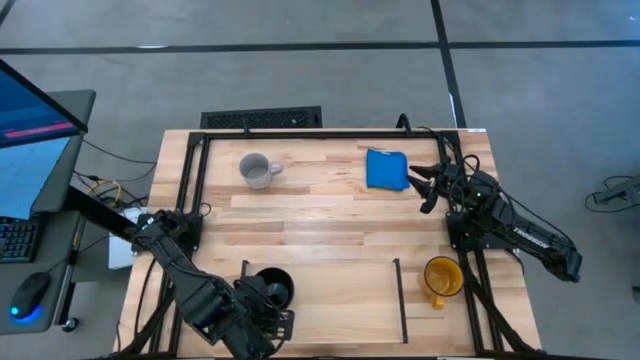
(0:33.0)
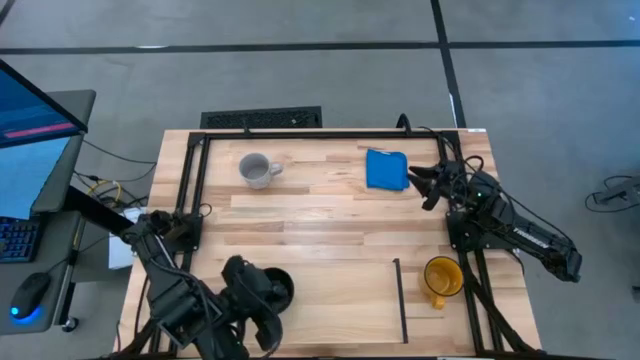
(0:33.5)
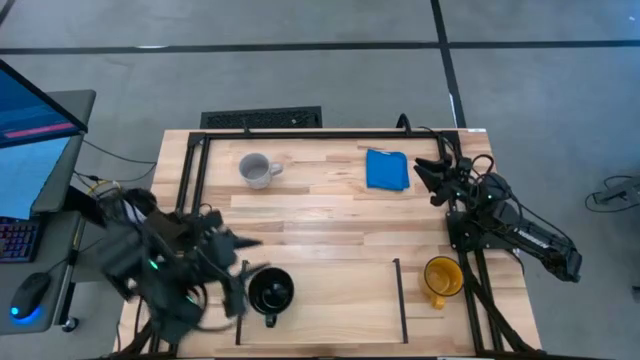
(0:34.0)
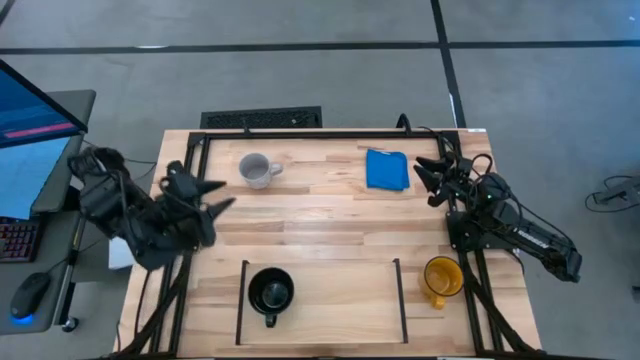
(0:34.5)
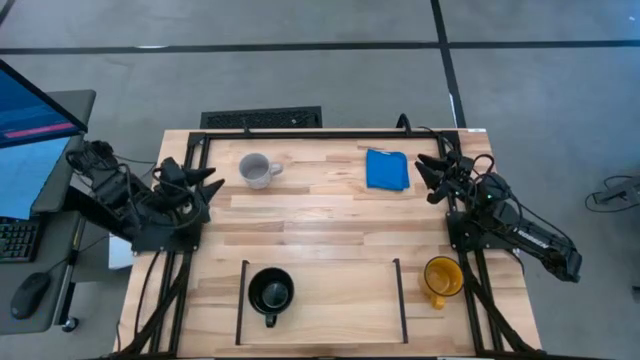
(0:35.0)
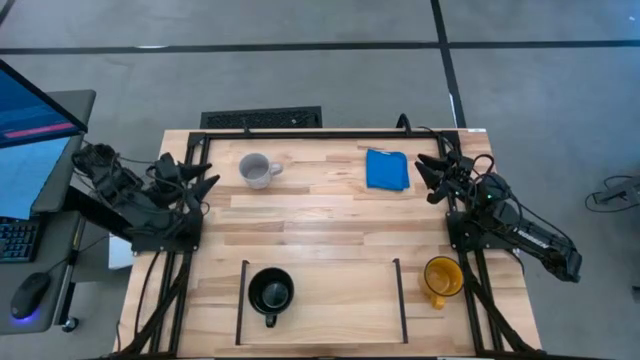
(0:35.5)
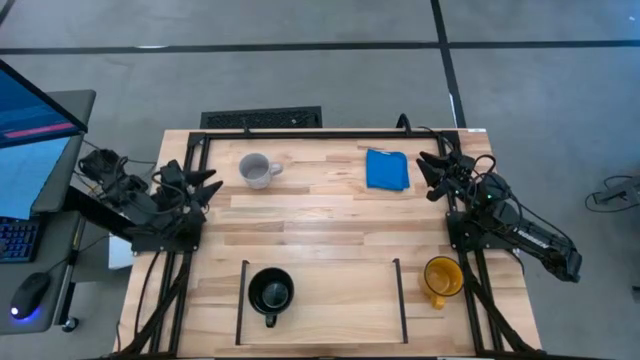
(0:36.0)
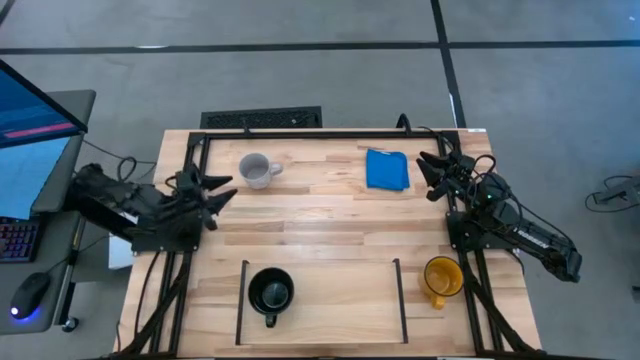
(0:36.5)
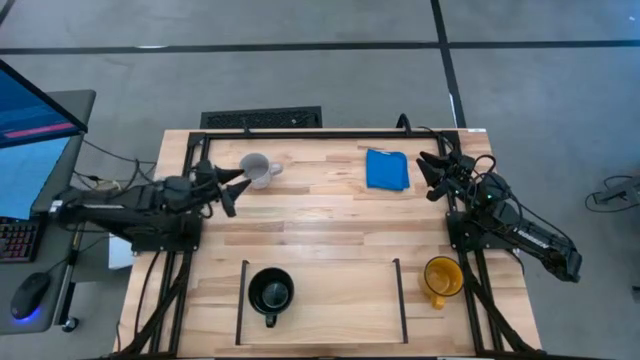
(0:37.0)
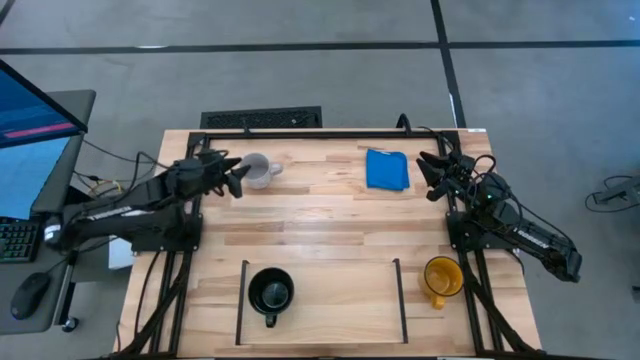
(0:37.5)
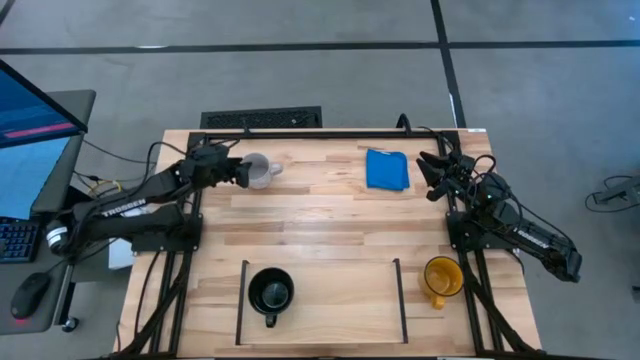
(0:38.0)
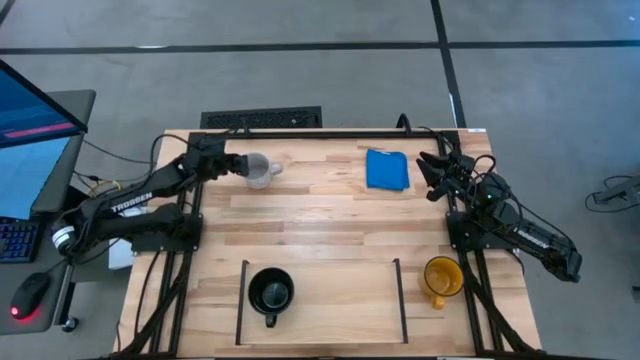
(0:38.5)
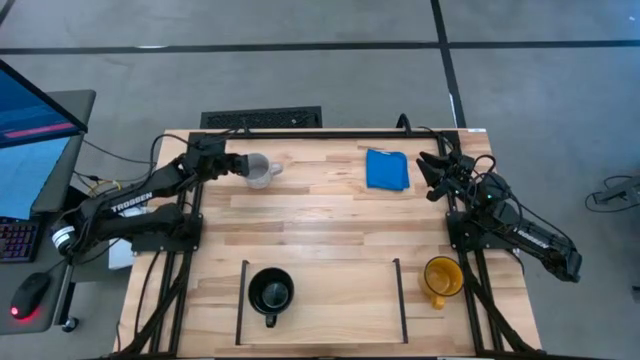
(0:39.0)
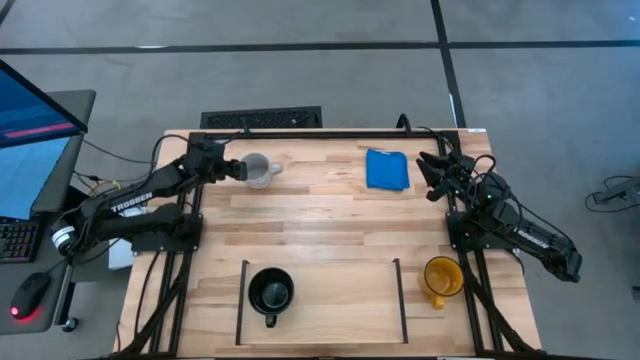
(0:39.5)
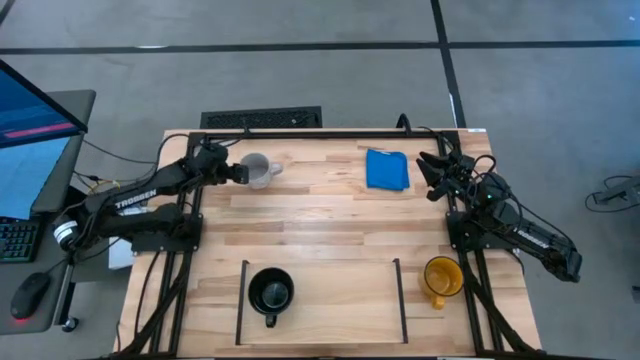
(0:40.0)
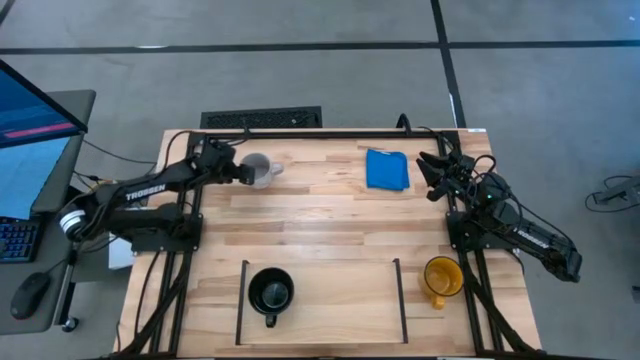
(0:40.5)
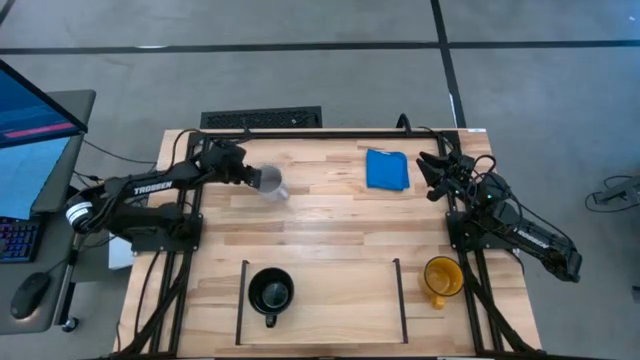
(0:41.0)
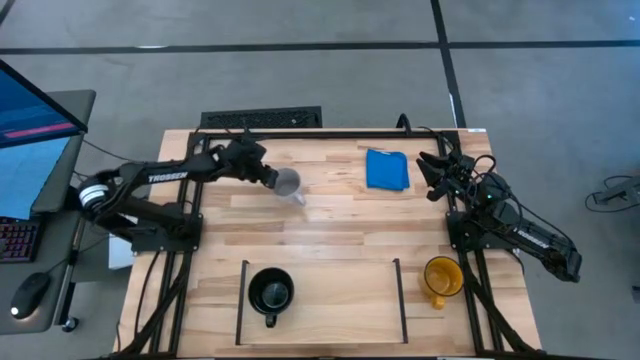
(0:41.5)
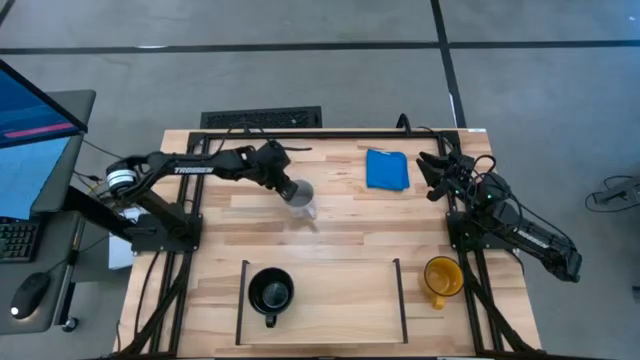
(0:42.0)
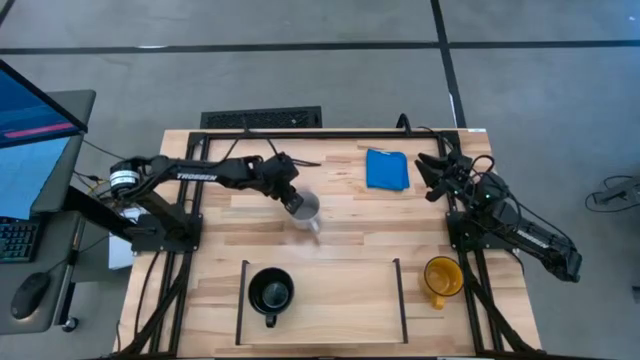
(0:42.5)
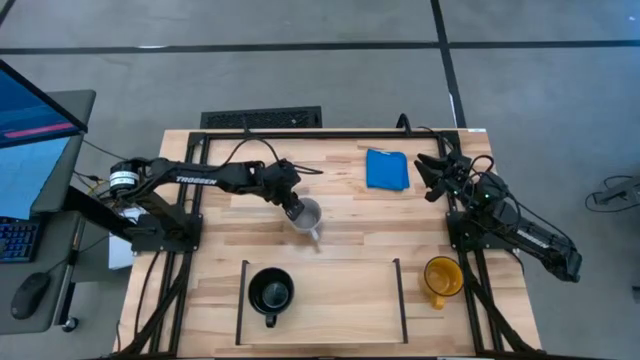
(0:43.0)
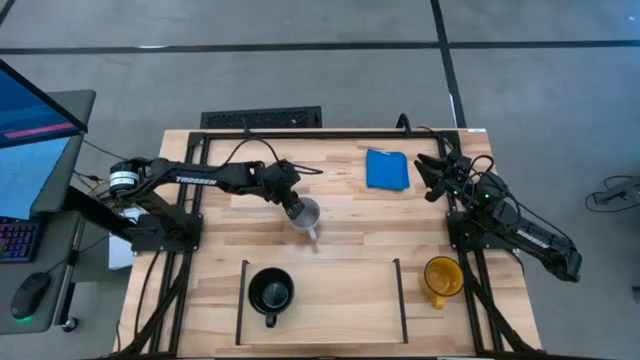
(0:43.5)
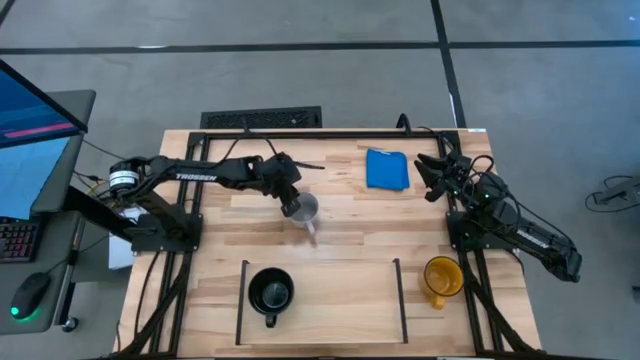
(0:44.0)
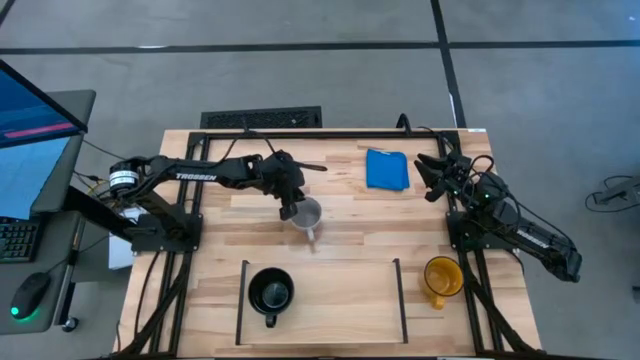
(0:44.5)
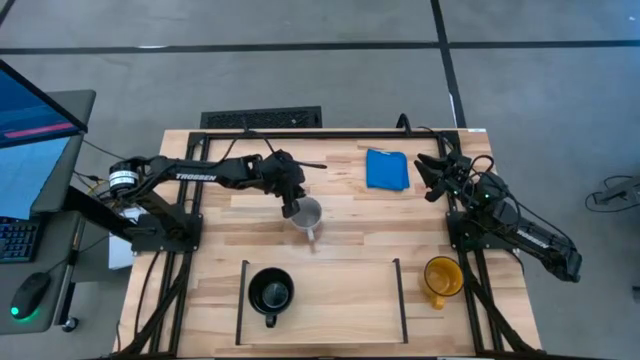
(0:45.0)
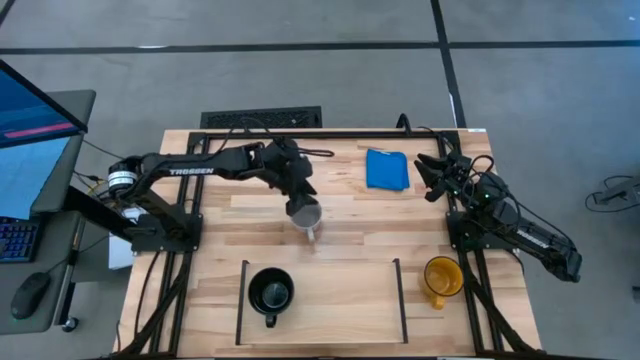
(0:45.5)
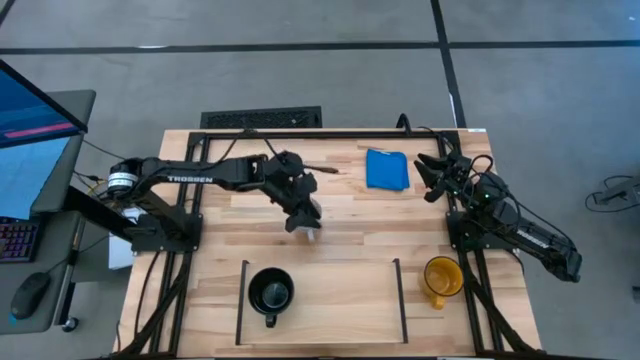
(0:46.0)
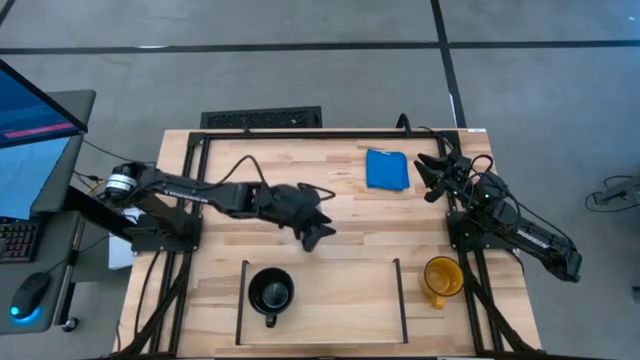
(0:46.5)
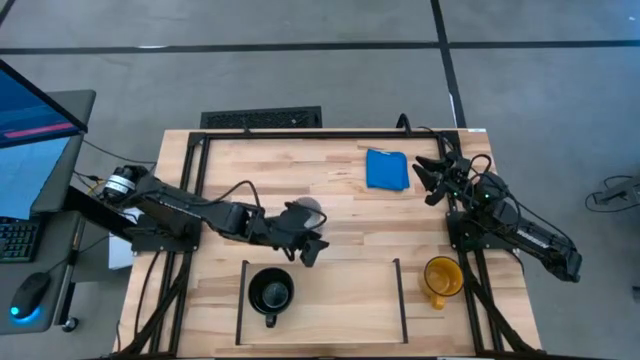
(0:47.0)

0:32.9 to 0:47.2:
Task: Stack small to large cups/mugs on shelf
Put the white mug on the shelf

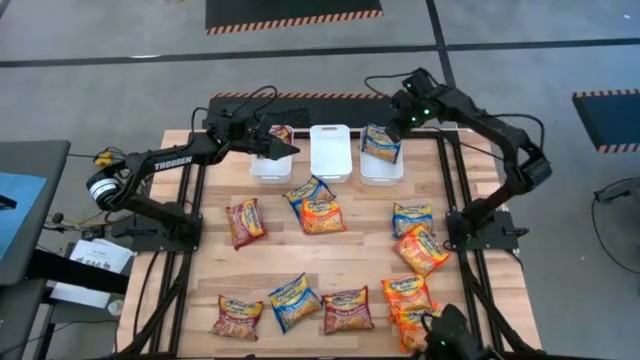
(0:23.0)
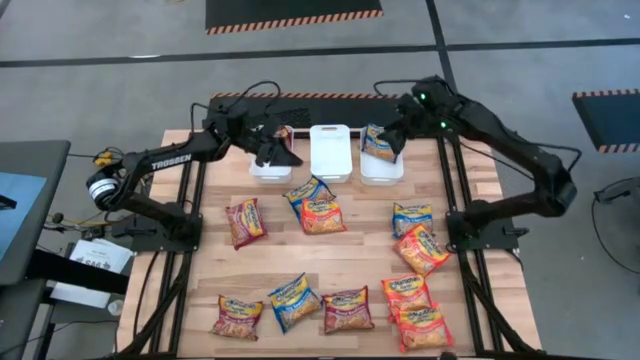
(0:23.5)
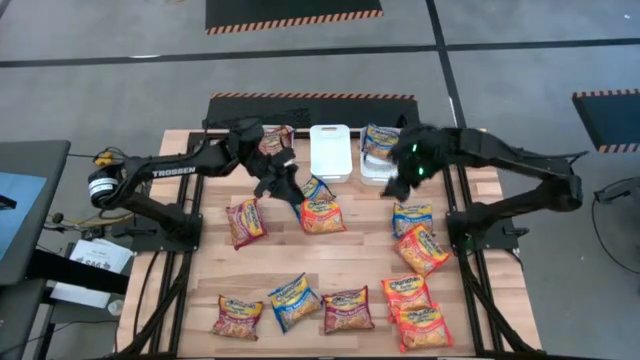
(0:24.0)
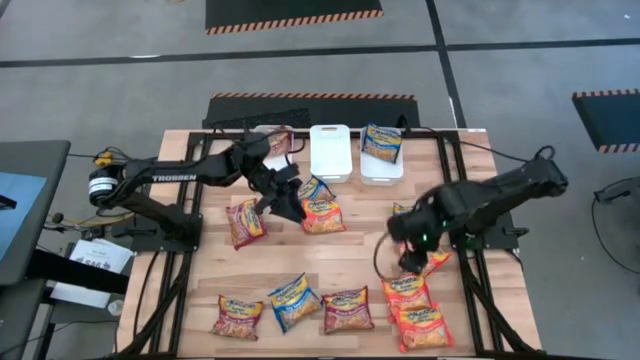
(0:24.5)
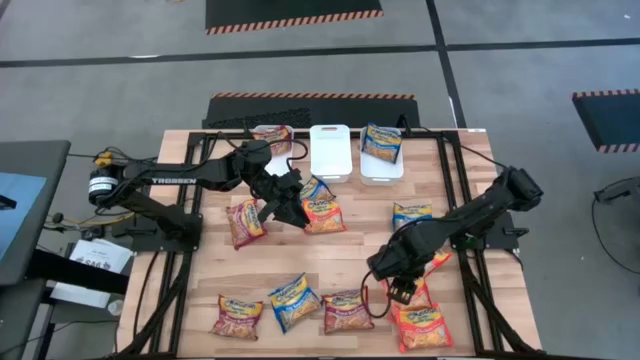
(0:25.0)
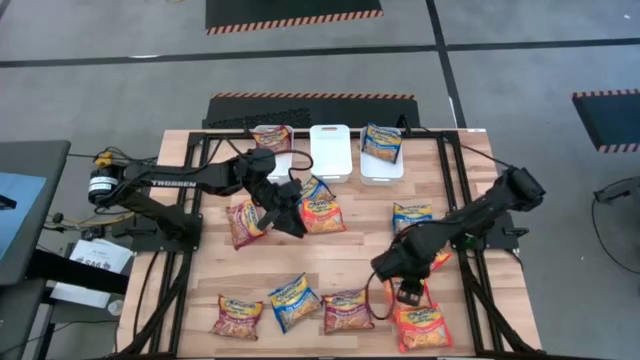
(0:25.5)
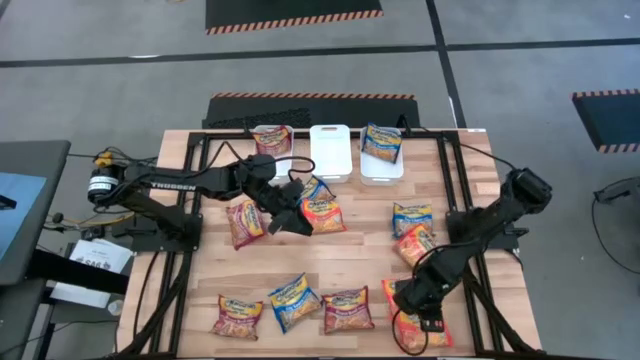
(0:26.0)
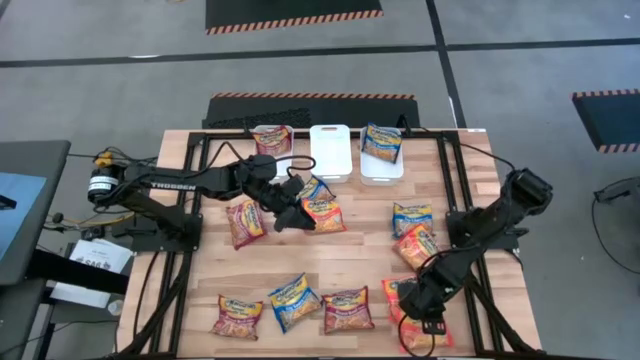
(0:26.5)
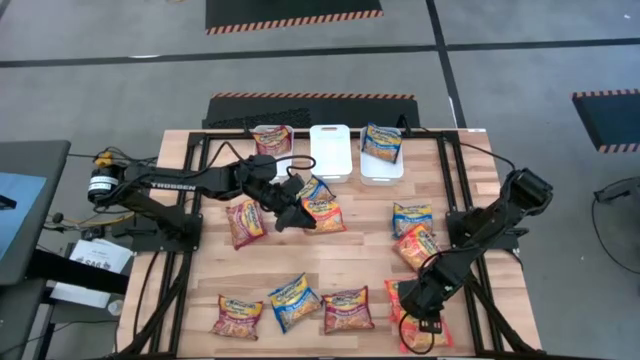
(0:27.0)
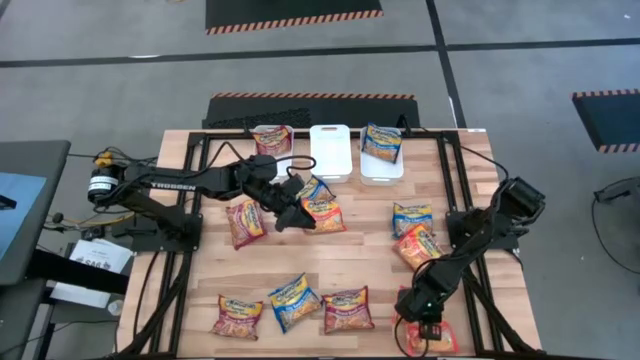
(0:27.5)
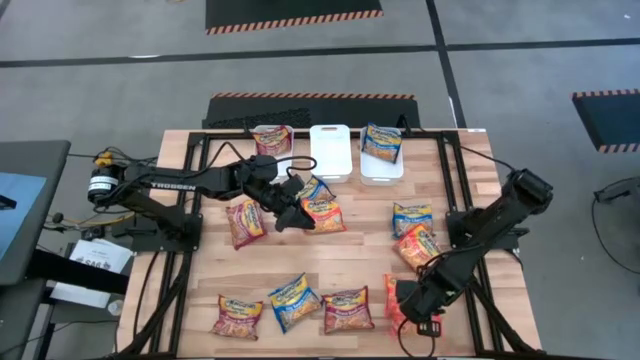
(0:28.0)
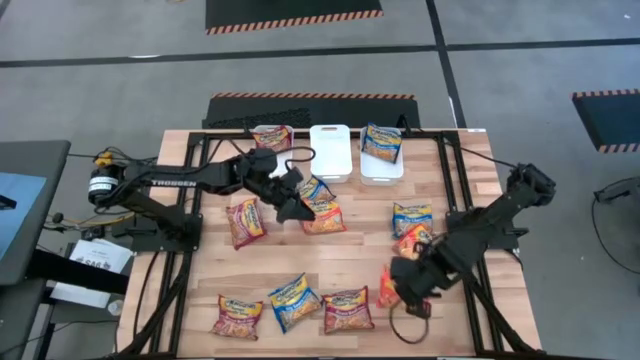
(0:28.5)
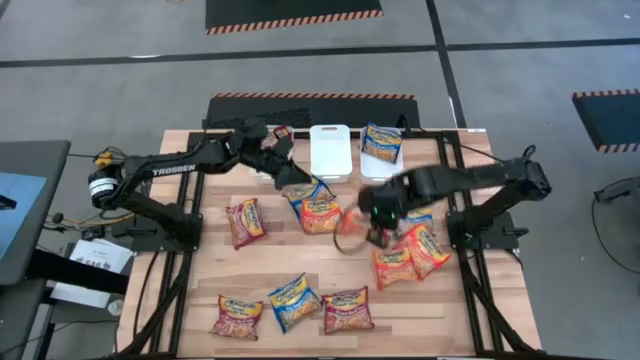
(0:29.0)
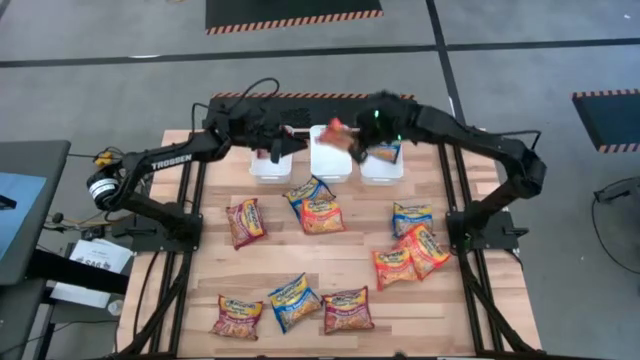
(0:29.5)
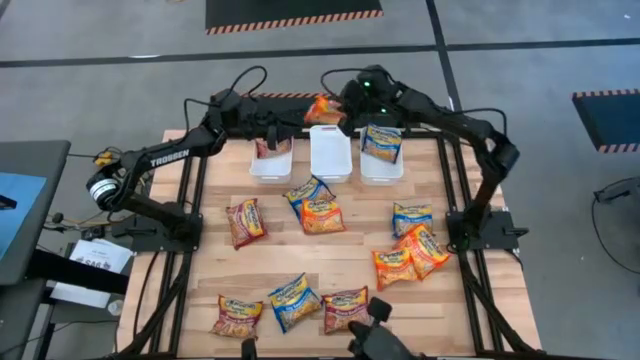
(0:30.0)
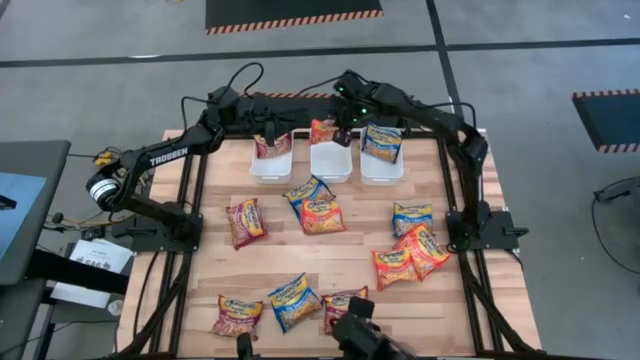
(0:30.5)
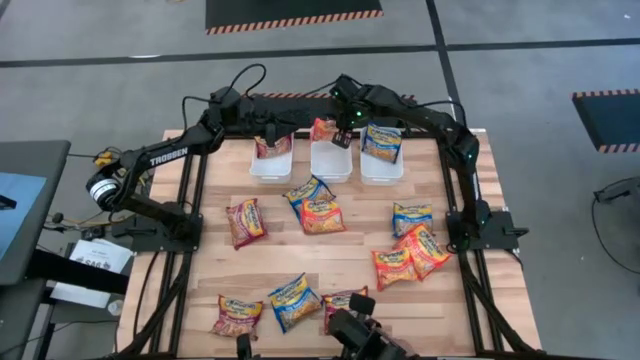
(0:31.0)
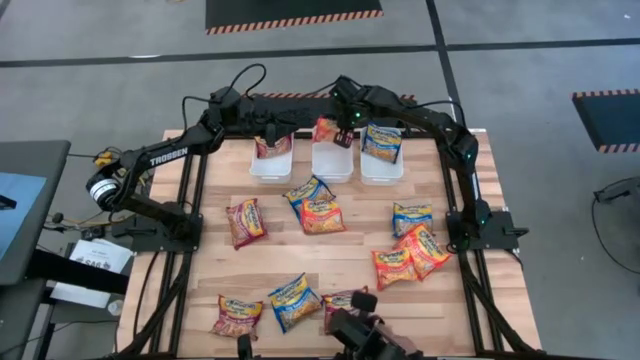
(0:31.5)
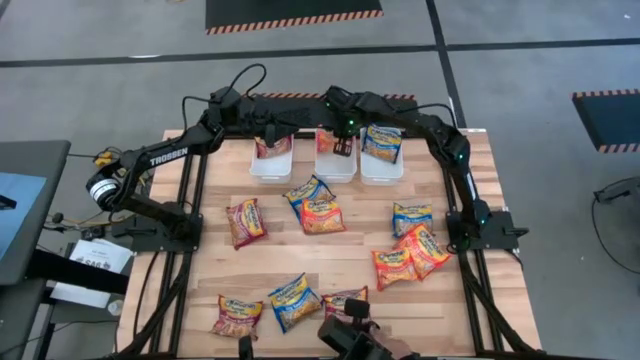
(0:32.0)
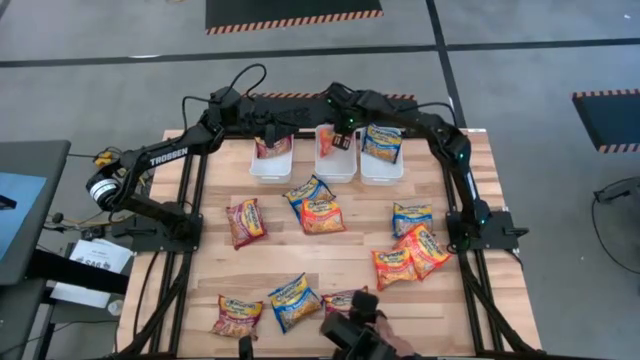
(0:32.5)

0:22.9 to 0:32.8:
Task: Sort Maruchan noodles
Put the orange noodle pack into the middle white bin
